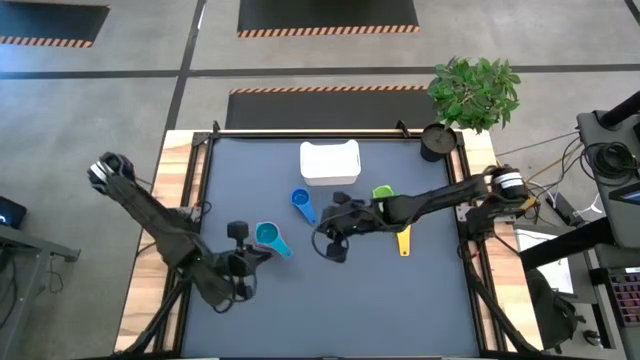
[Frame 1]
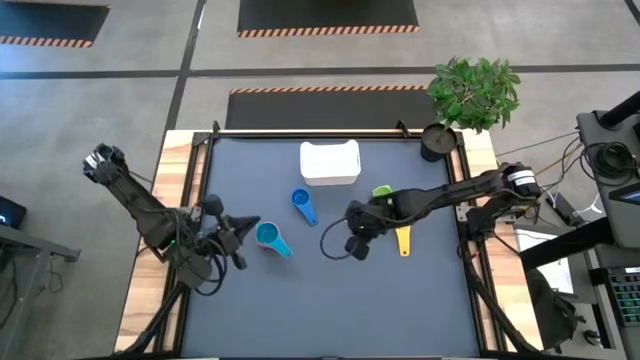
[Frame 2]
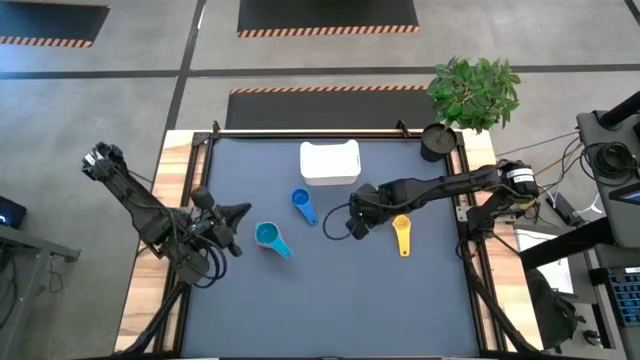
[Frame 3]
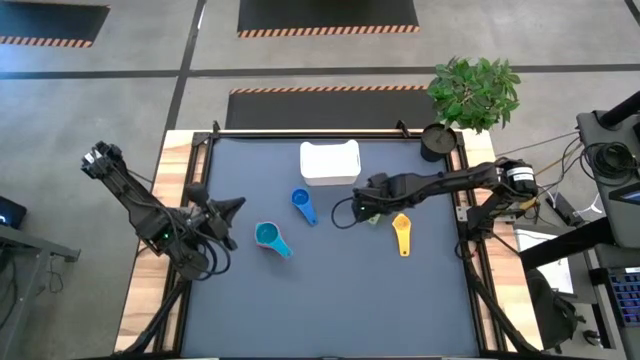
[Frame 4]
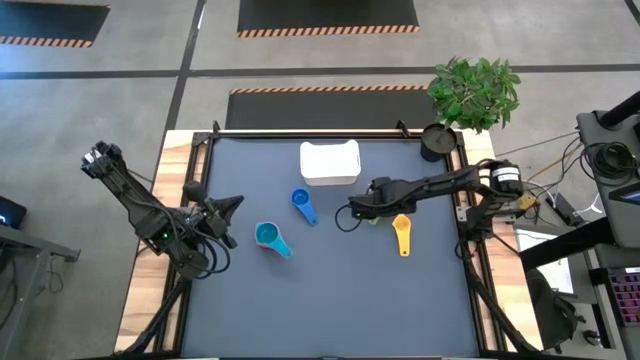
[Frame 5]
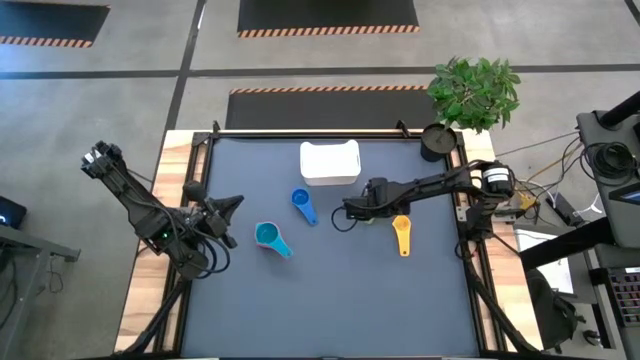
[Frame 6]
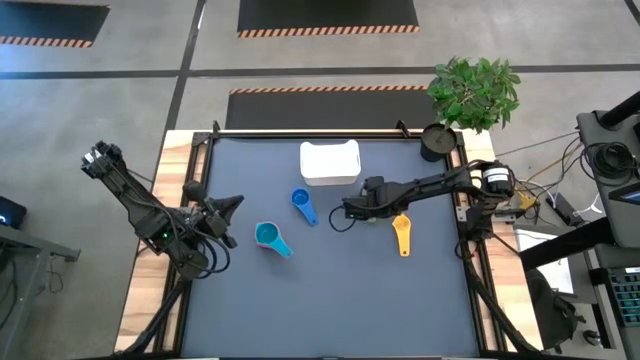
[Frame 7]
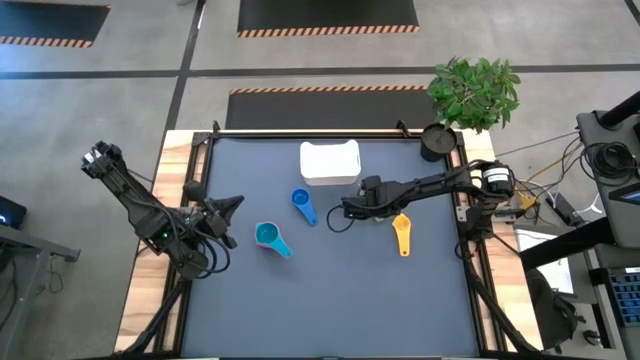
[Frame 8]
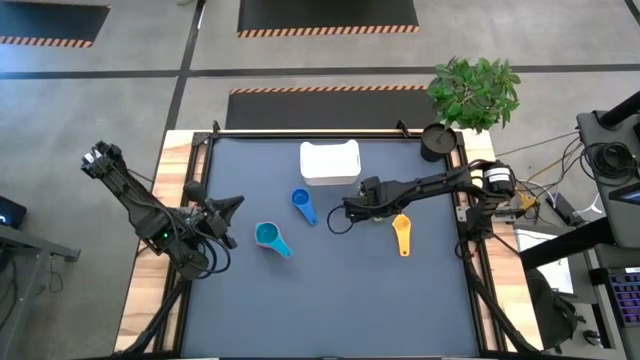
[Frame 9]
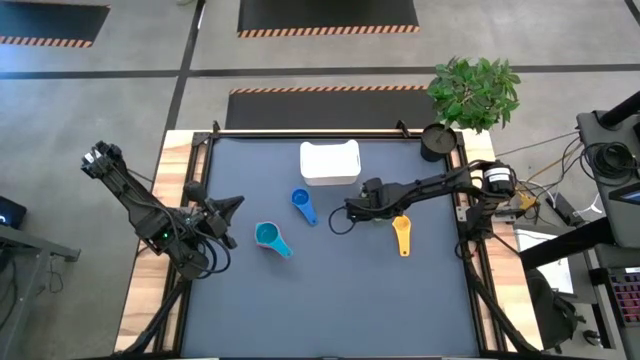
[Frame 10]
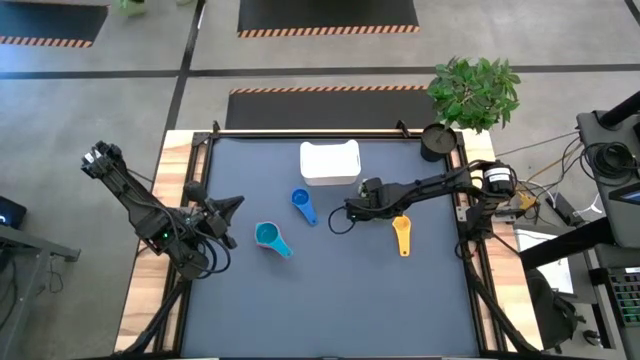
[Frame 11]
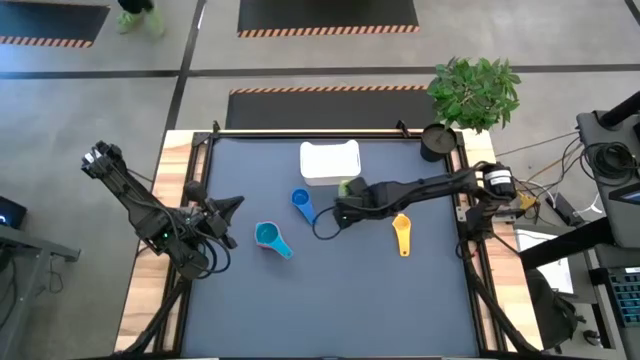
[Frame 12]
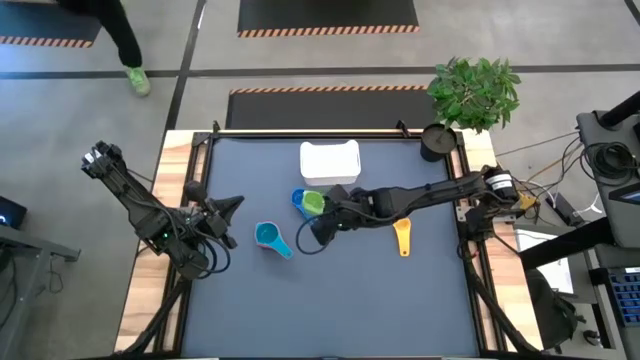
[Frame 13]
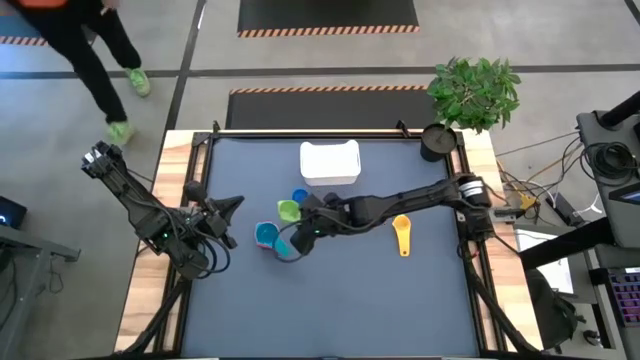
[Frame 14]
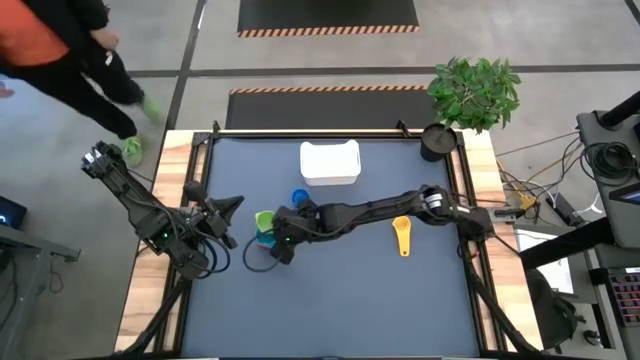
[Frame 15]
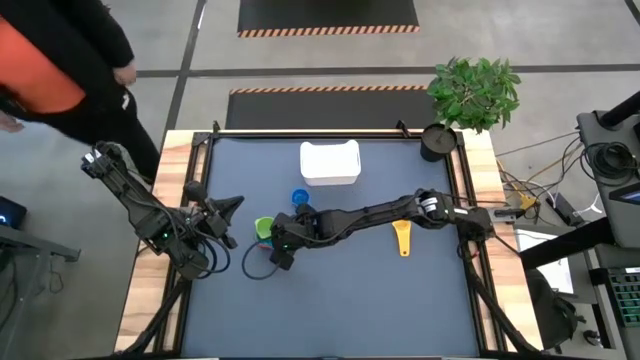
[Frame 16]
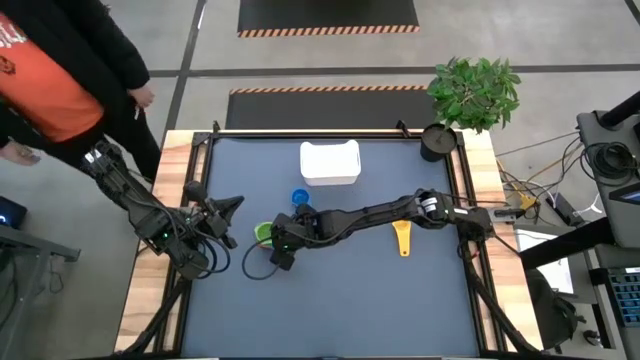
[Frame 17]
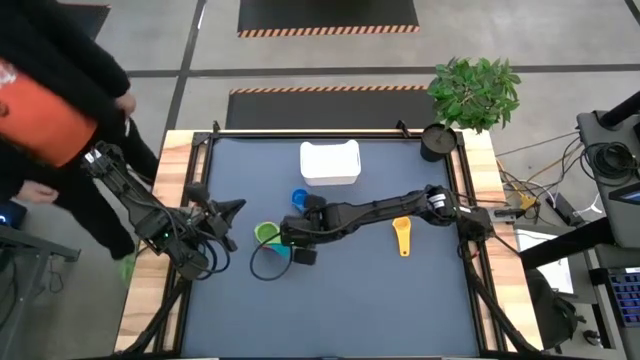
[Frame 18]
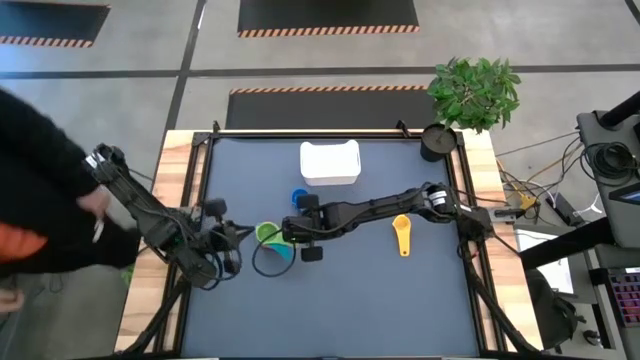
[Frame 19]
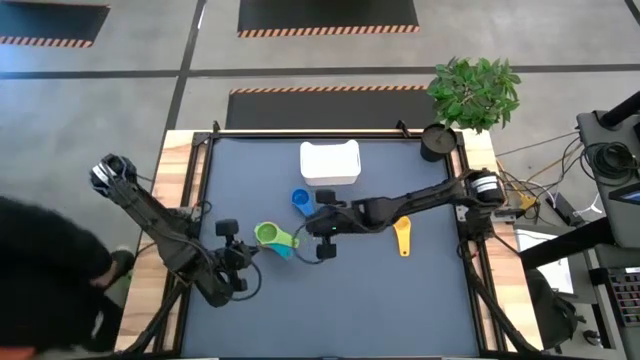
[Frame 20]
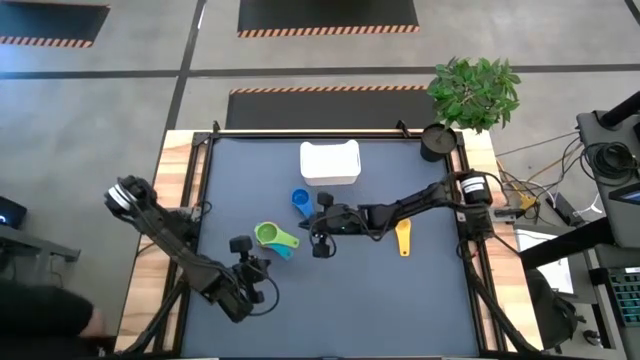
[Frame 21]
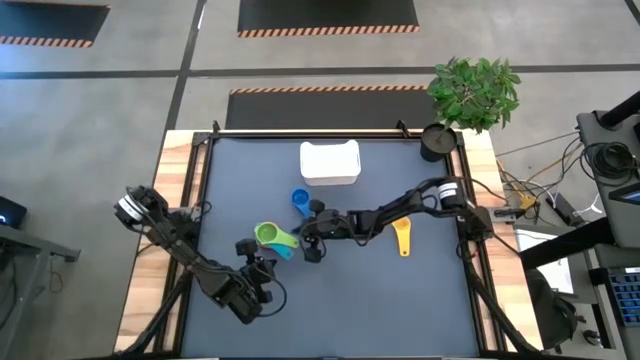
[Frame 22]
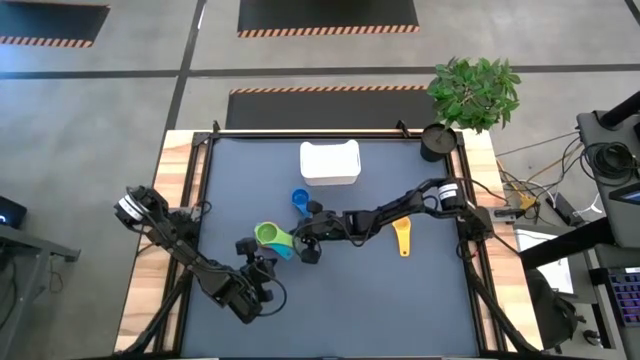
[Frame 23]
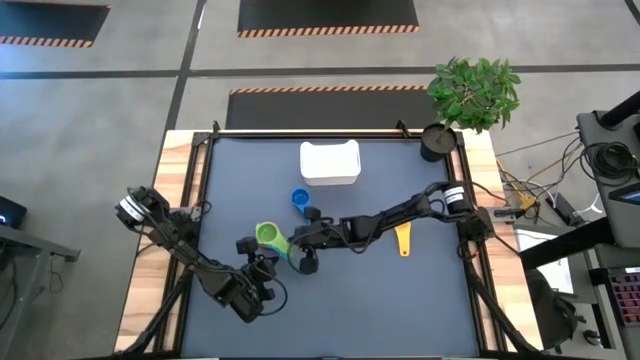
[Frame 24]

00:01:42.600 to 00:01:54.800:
Task: Nest measuring cups in basket
Stack the green measuring cup on top of the light blue measuring cup

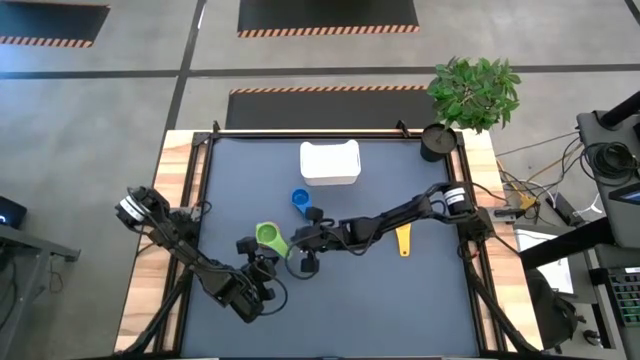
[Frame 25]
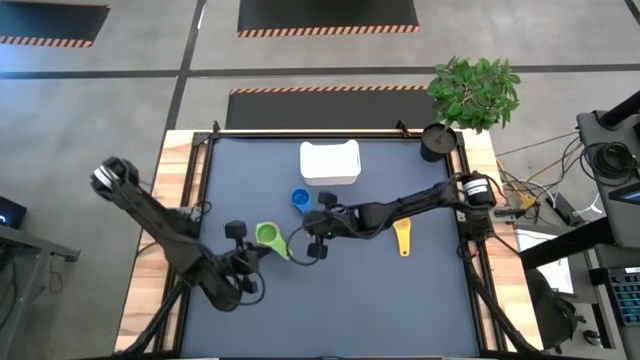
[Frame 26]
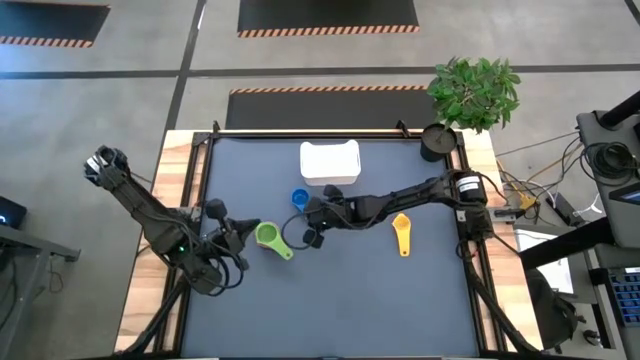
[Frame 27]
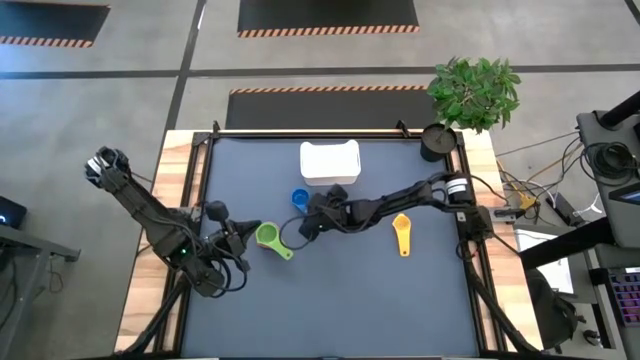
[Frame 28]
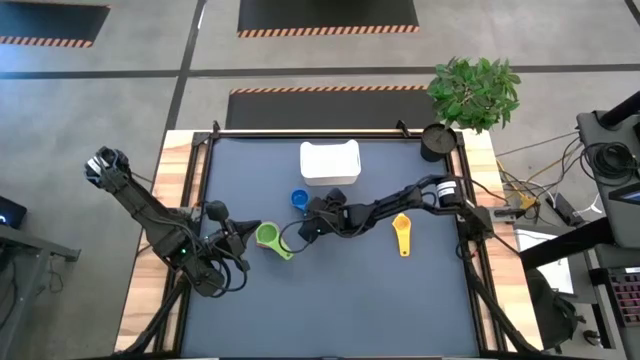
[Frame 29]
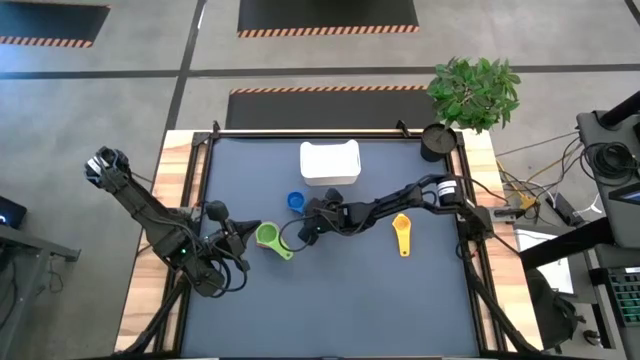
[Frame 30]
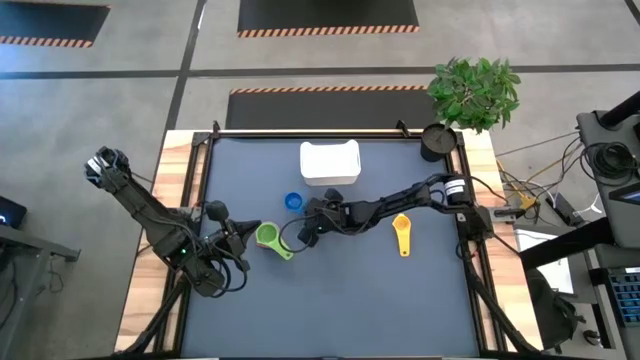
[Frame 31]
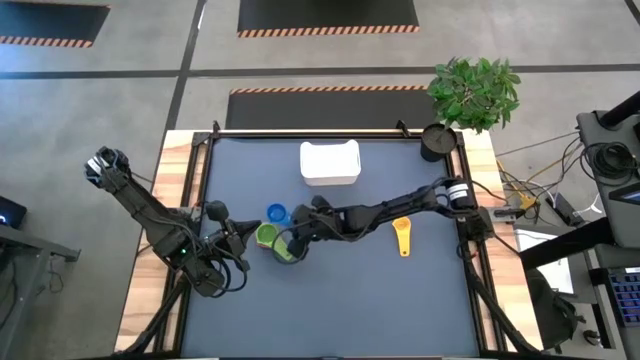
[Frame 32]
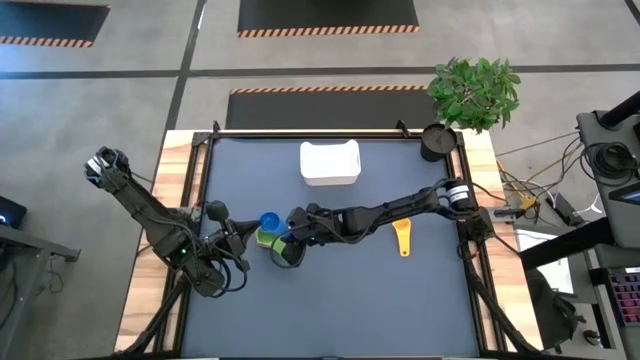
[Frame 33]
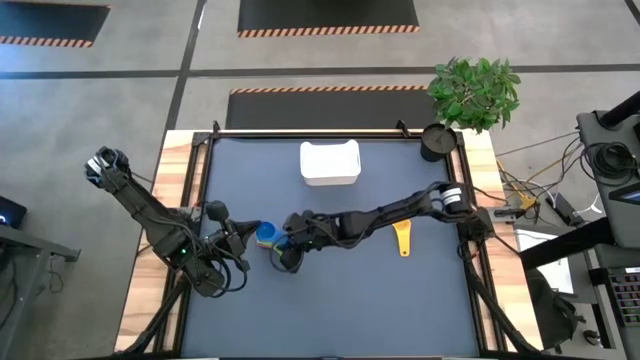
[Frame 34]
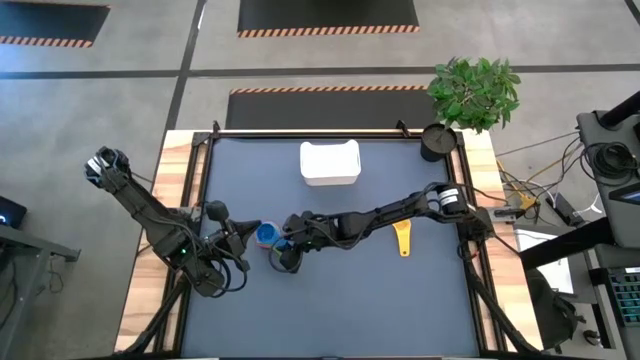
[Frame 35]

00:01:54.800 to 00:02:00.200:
Stack the blue measuring cup on top of the green measuring cup

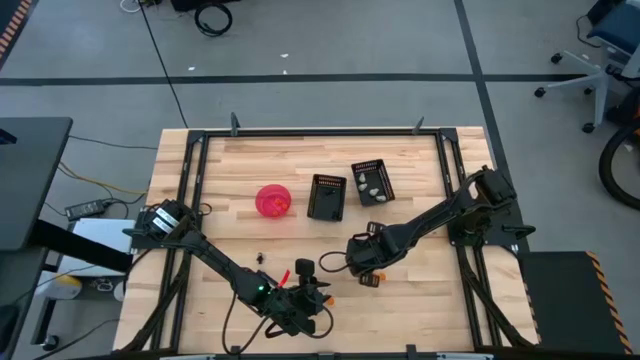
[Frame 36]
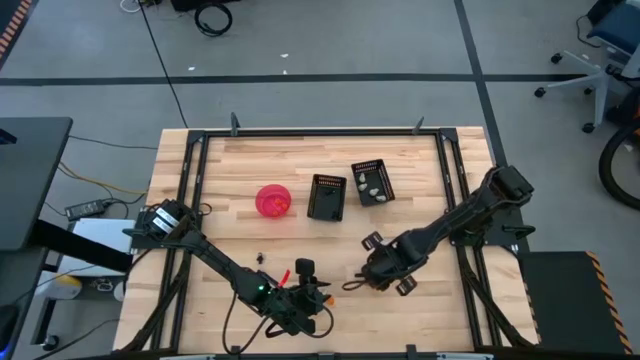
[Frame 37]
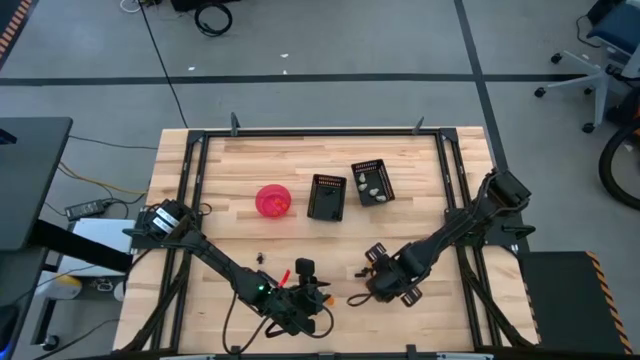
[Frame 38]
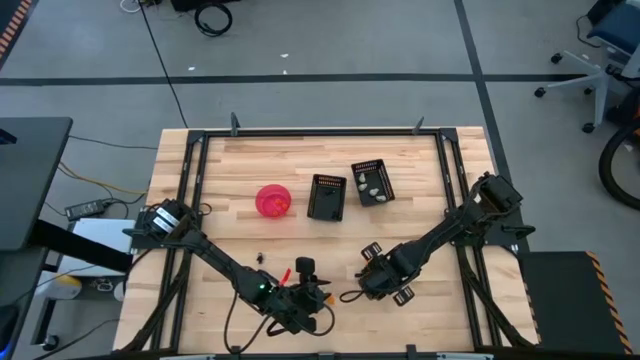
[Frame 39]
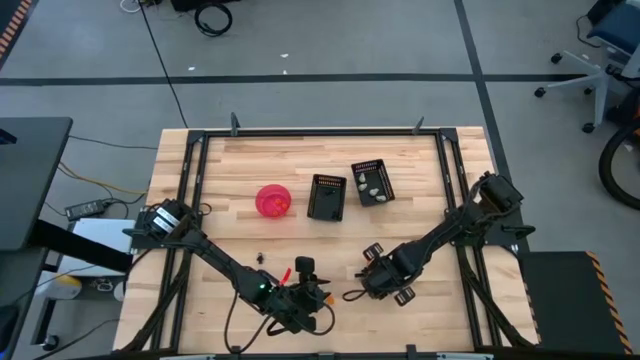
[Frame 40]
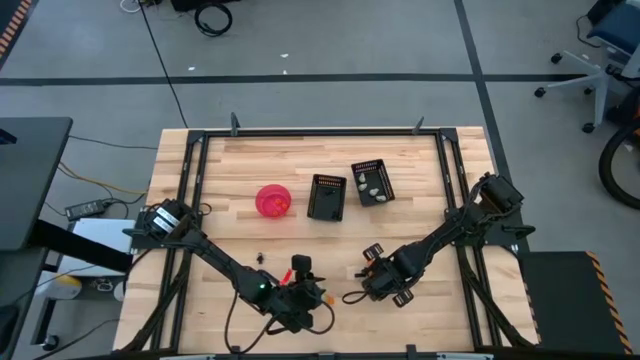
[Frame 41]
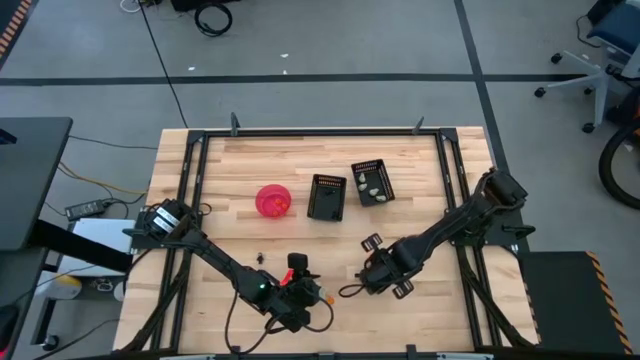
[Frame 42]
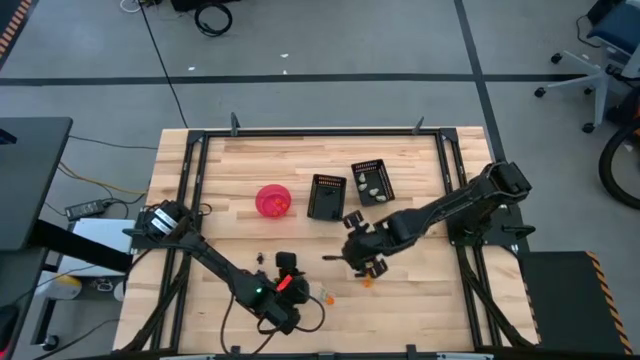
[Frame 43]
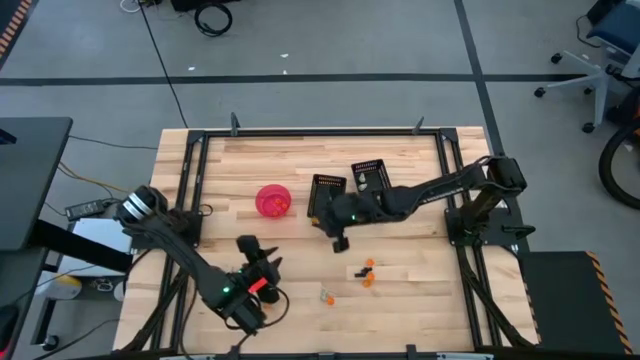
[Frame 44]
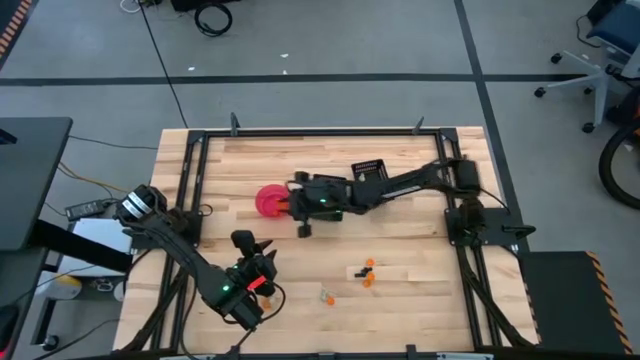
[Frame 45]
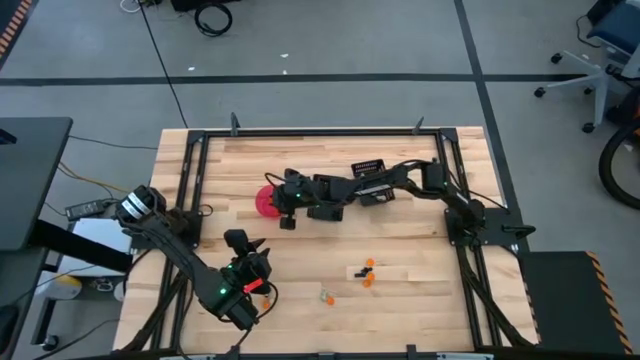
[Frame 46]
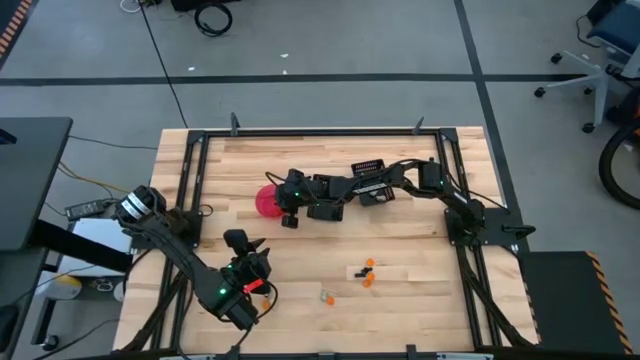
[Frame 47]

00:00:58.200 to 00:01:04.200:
Task: Sort Halloween decoration
Put the orange pumpkin toy into the red bowl
